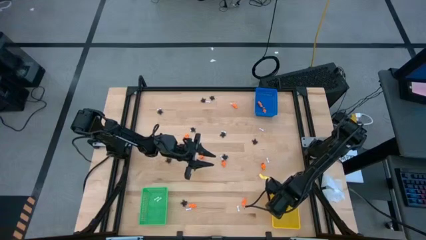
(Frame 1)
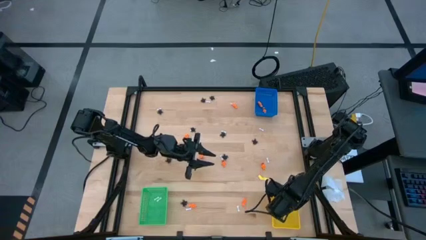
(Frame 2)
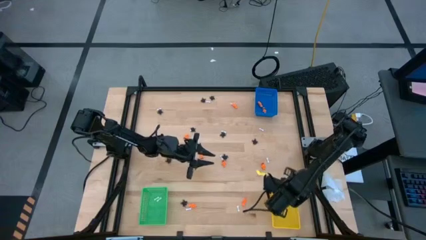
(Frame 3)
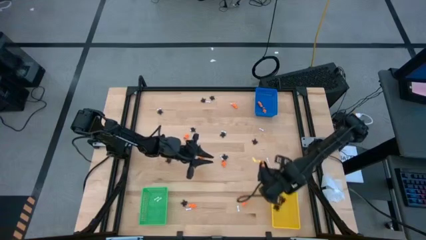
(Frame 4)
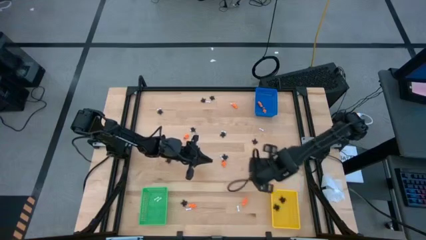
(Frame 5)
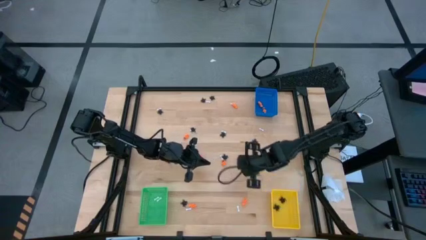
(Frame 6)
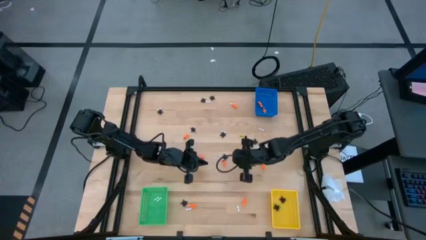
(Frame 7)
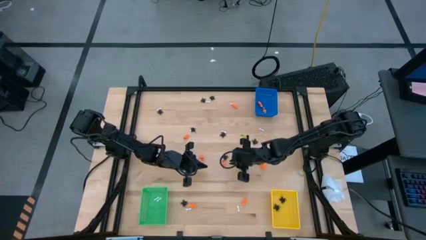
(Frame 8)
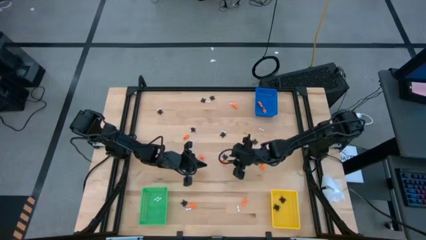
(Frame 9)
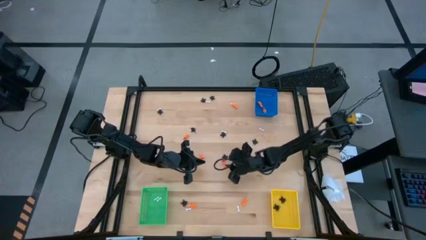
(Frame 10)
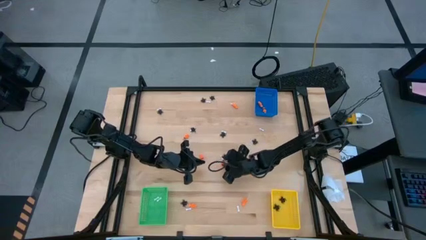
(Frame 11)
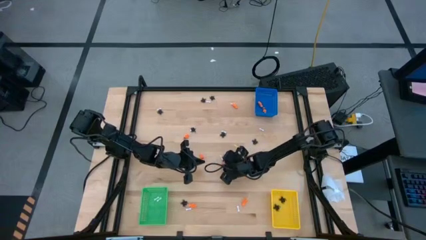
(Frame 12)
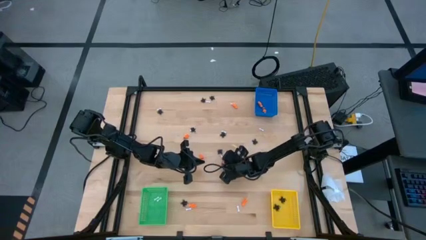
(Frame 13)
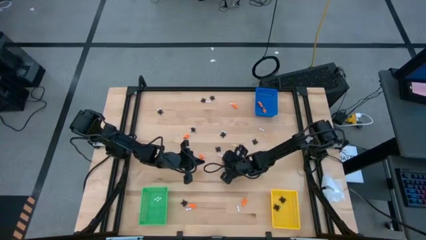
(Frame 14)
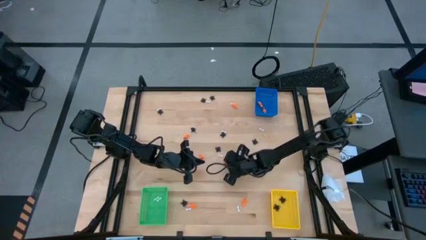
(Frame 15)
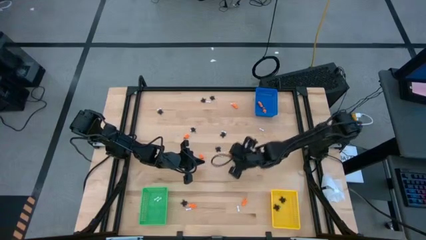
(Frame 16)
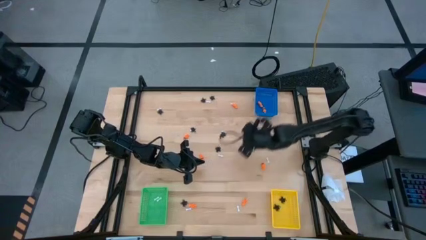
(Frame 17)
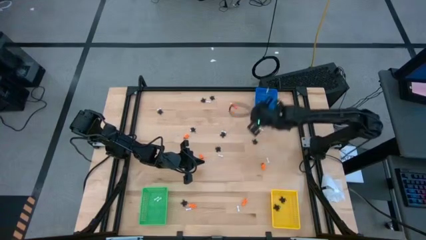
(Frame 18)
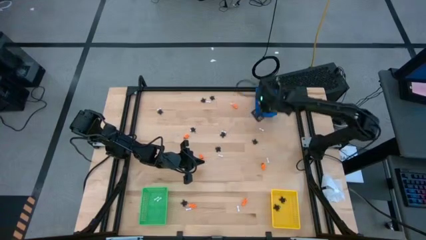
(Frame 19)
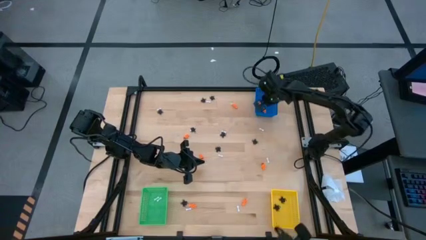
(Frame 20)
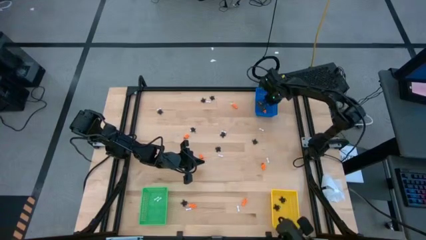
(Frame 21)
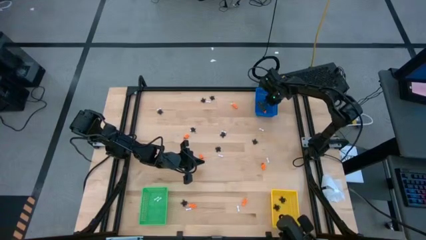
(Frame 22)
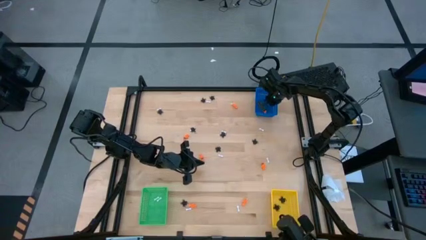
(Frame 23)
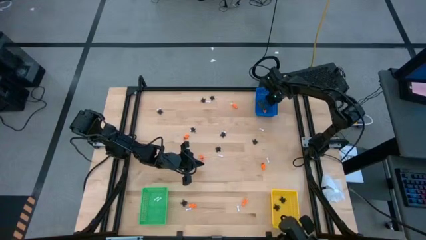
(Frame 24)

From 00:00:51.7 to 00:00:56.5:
Task: Sort Halloween decoration
Put the orange toy skeleton into the blue bin

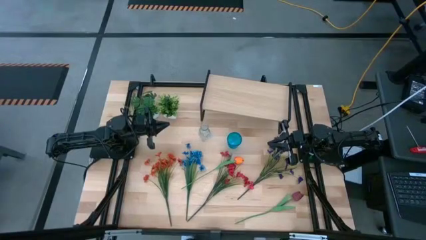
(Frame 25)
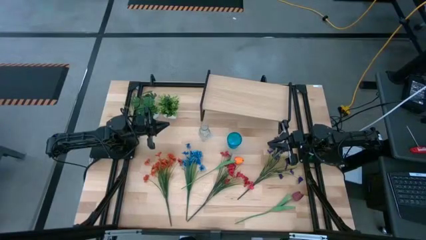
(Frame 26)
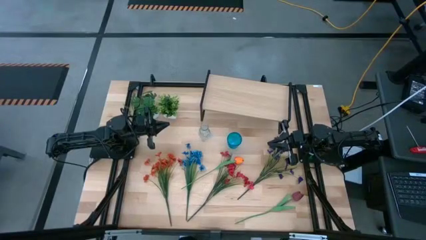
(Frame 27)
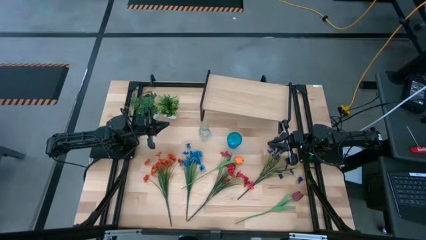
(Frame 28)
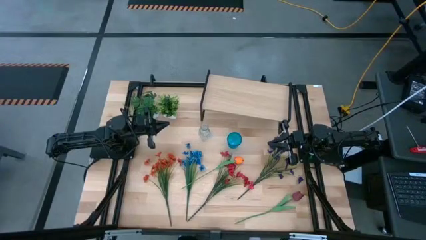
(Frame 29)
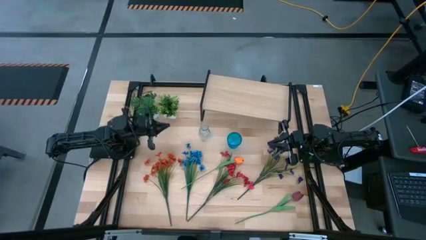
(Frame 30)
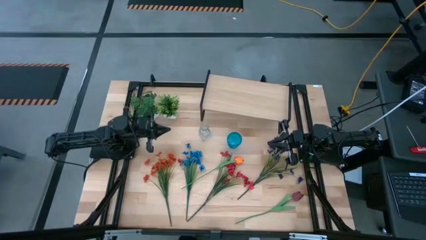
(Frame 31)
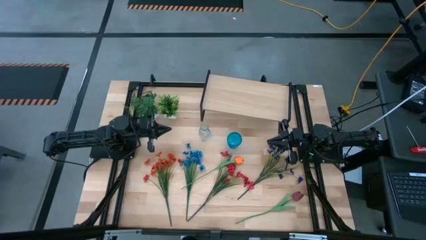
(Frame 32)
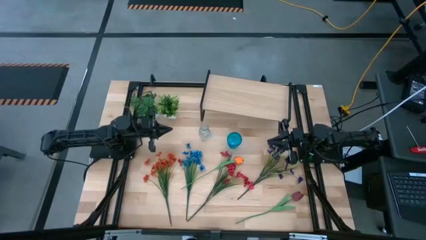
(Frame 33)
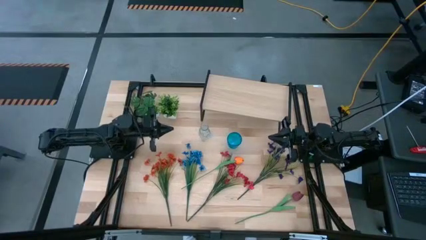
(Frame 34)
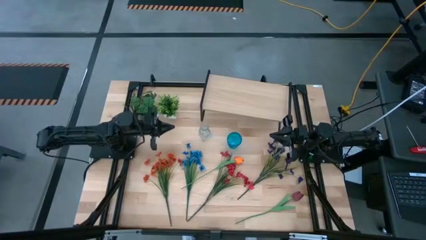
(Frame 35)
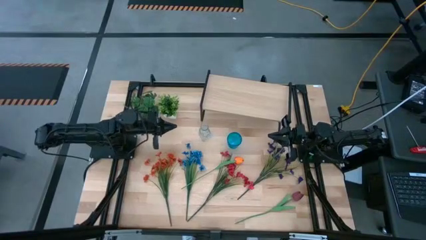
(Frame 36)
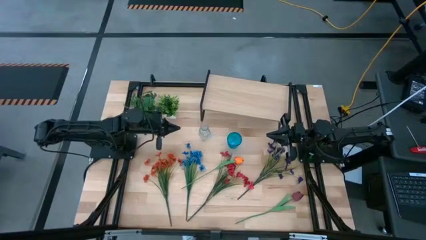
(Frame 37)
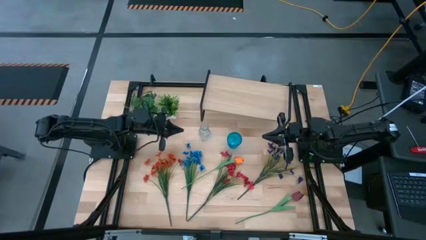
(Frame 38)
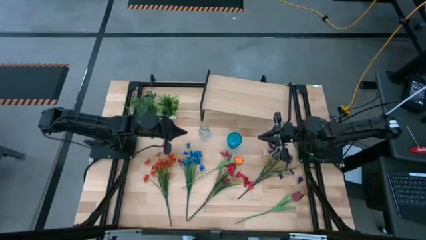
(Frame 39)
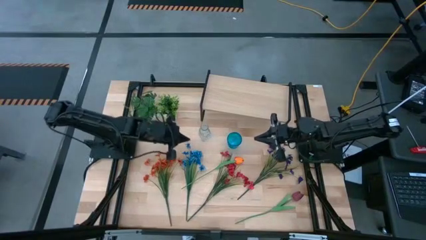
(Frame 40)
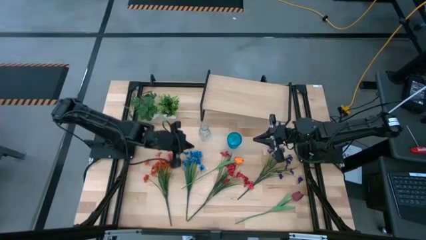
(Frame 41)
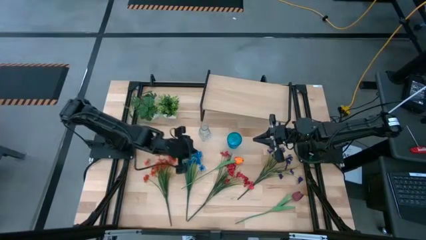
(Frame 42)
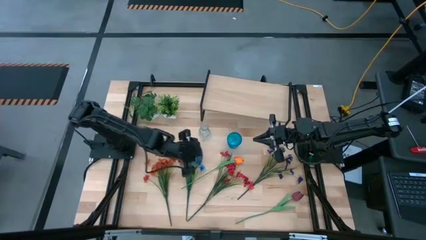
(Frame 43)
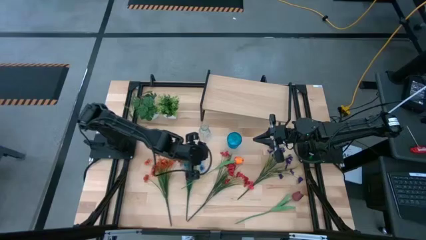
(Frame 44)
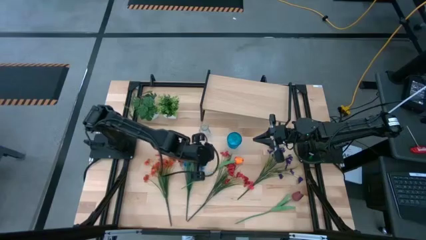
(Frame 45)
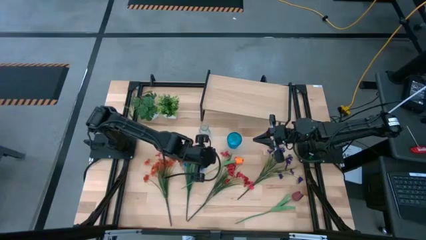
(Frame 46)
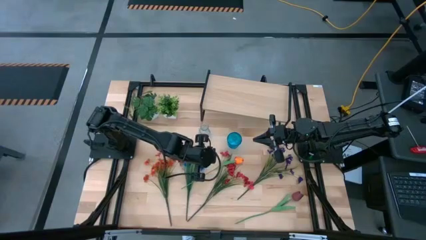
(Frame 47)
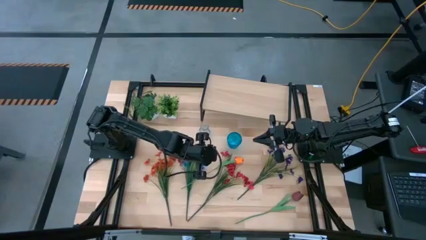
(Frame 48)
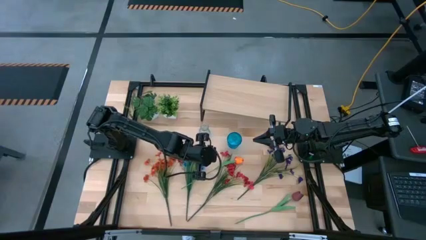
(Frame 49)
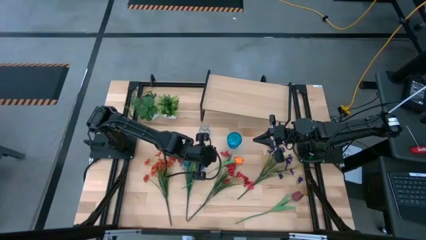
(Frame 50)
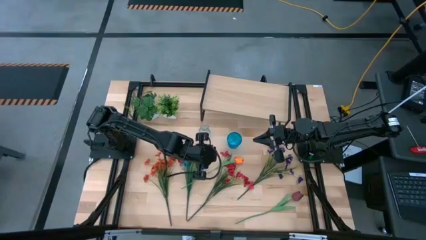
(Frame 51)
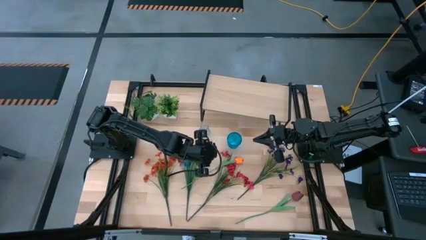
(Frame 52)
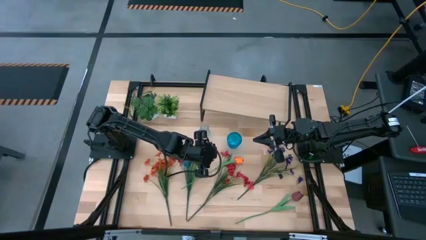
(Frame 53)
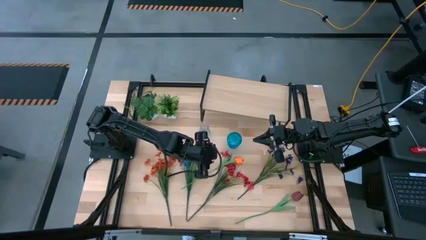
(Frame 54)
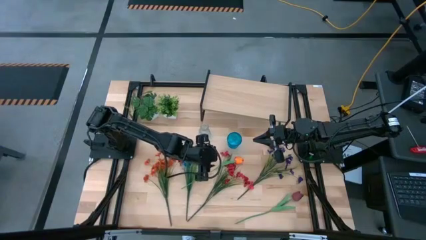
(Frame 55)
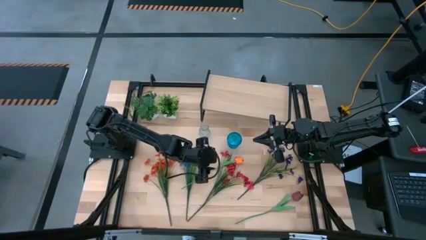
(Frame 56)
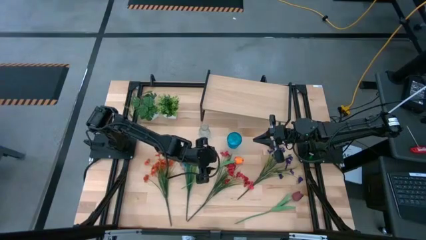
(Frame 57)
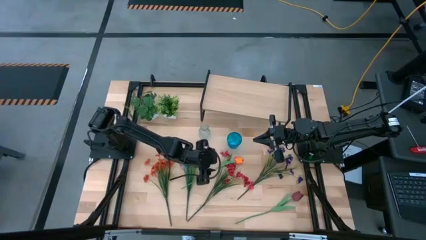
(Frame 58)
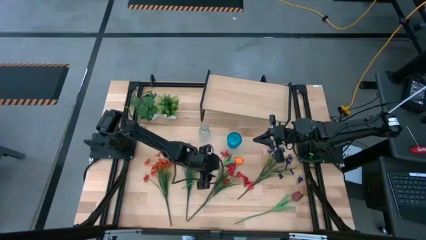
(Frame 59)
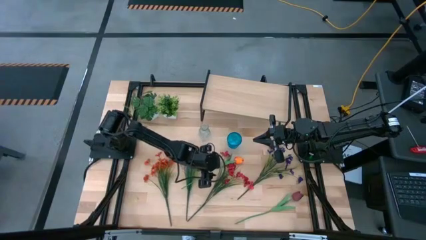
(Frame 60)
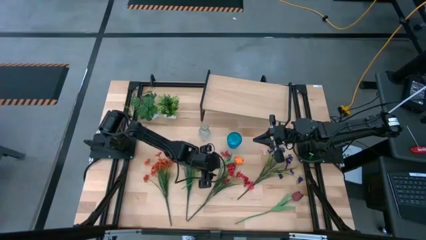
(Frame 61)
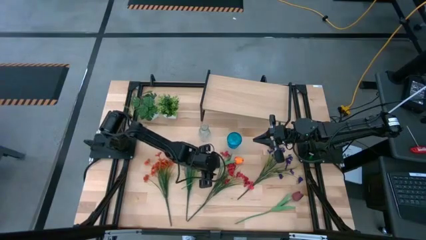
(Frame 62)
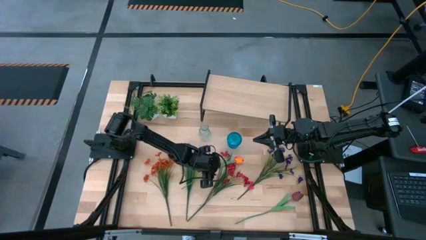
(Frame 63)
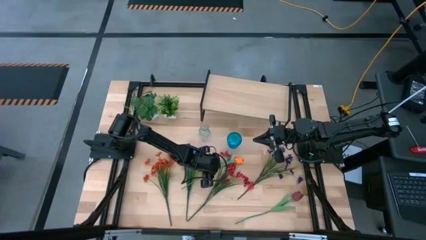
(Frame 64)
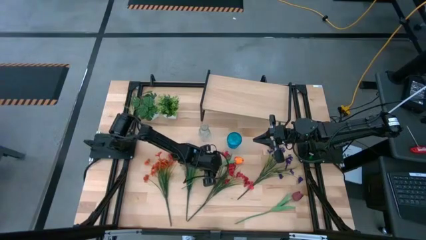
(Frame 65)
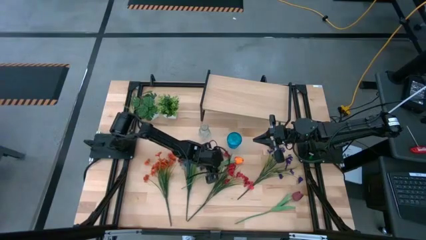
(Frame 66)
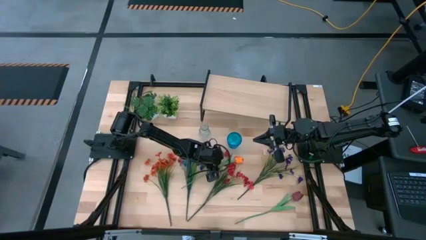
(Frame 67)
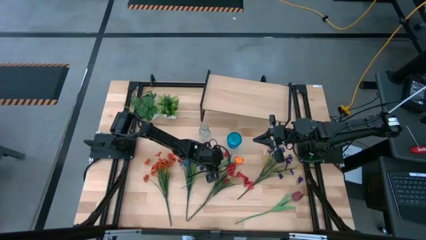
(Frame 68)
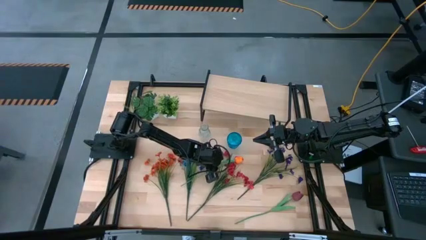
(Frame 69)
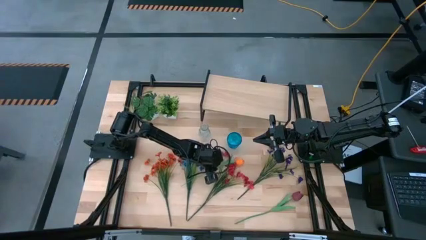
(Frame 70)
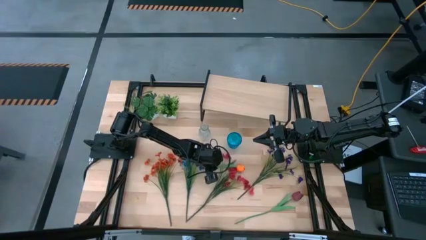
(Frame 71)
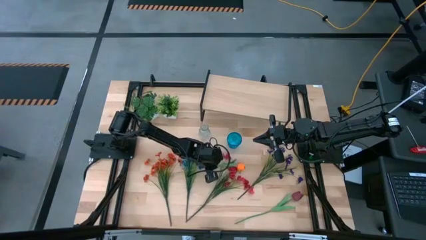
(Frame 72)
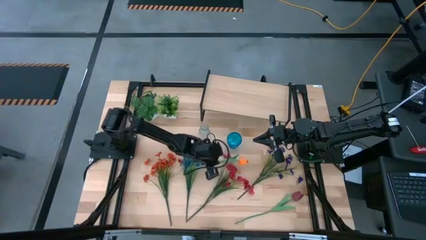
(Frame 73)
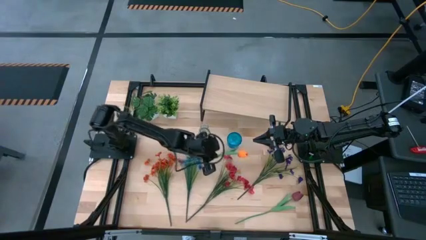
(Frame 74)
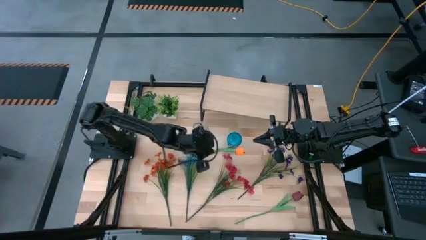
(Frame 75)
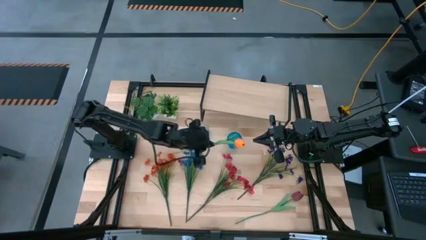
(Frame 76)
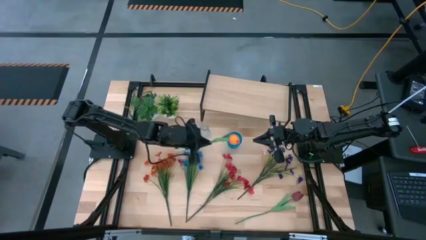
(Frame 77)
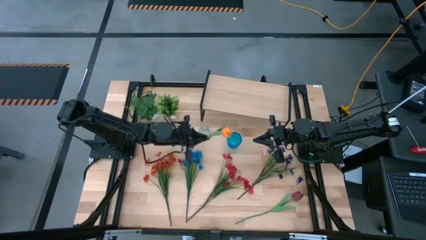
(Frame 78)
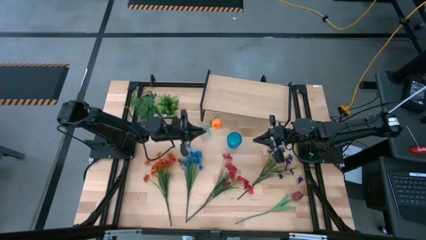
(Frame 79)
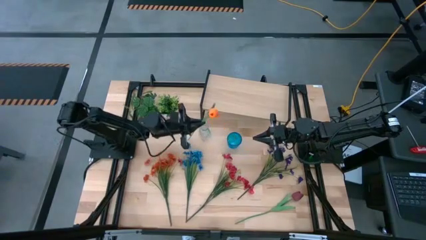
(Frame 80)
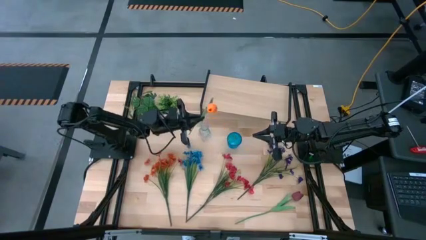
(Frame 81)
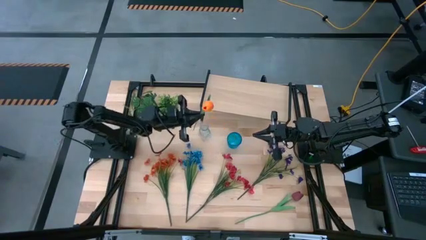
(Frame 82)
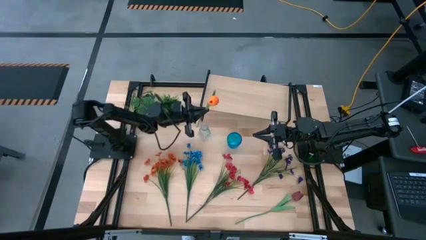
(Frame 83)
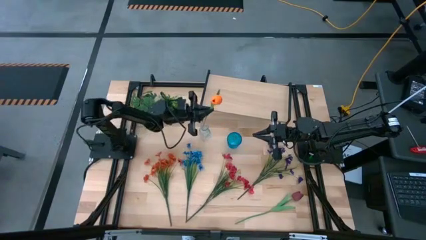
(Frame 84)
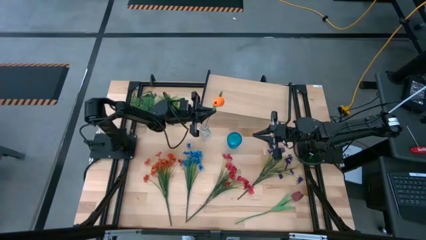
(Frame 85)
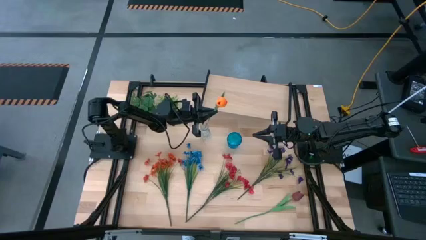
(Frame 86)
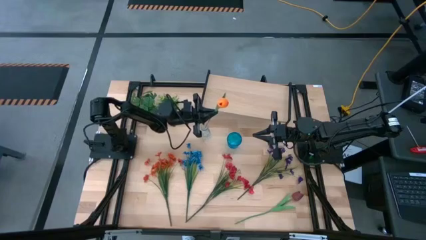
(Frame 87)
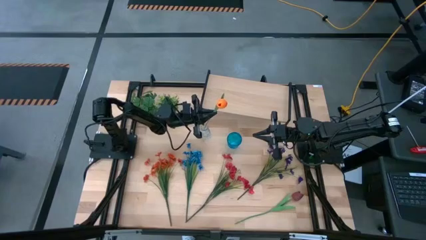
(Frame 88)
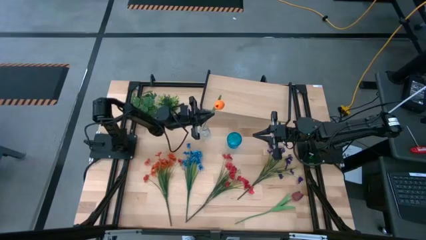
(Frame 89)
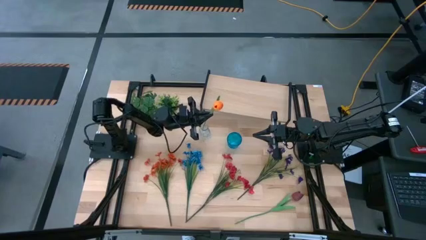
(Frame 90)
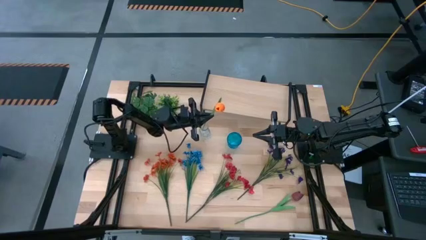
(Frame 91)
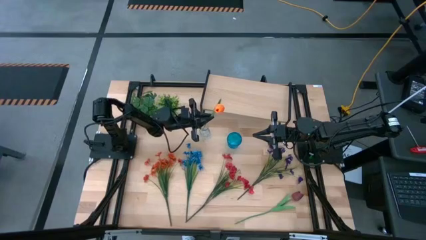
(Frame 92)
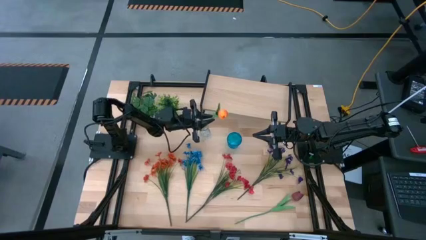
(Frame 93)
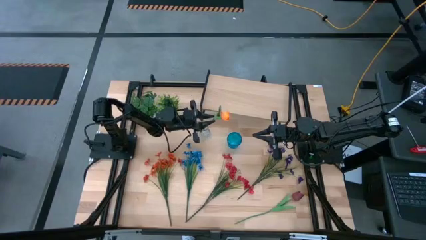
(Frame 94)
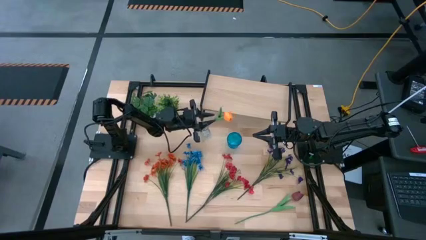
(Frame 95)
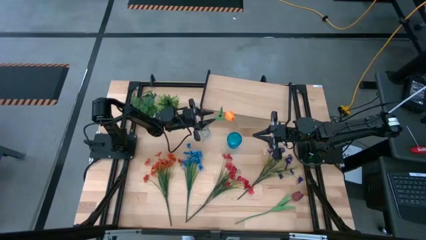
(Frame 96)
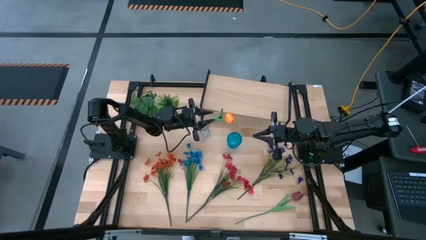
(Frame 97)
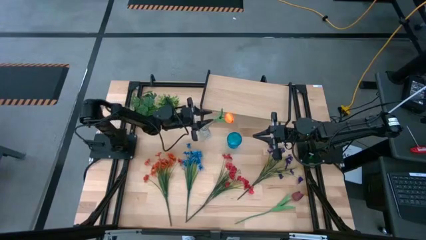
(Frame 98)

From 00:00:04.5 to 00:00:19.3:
Task: Pick and place flowers into a vace then onto a shelf
Put the orange flower into the transparent vase
